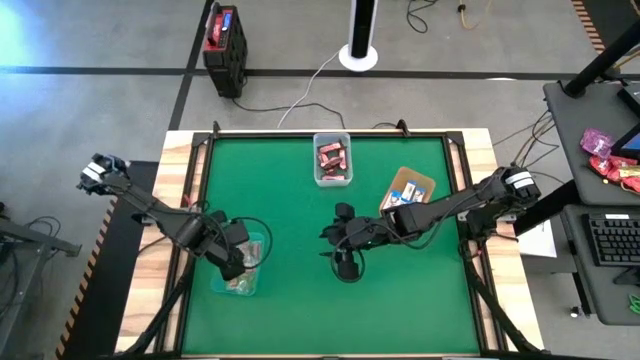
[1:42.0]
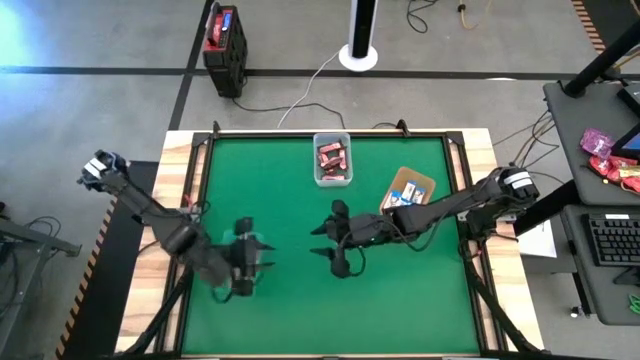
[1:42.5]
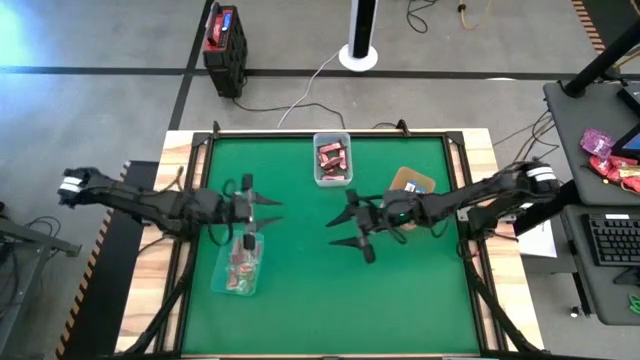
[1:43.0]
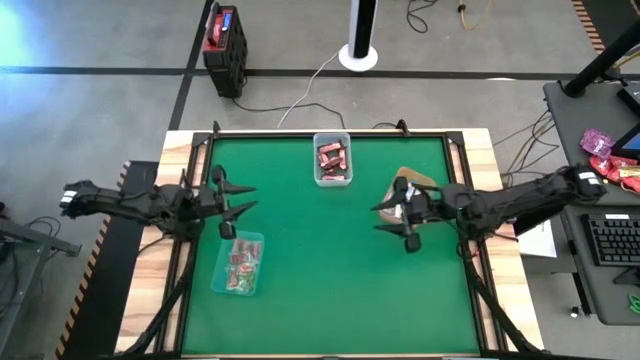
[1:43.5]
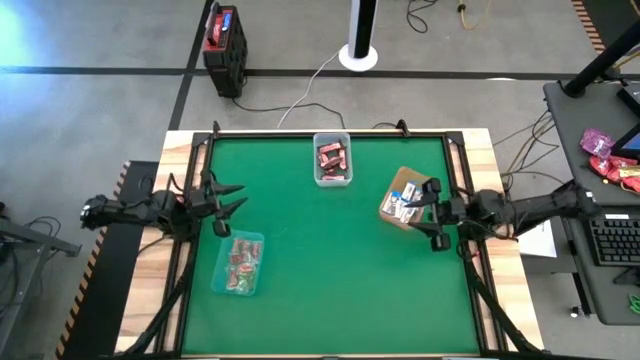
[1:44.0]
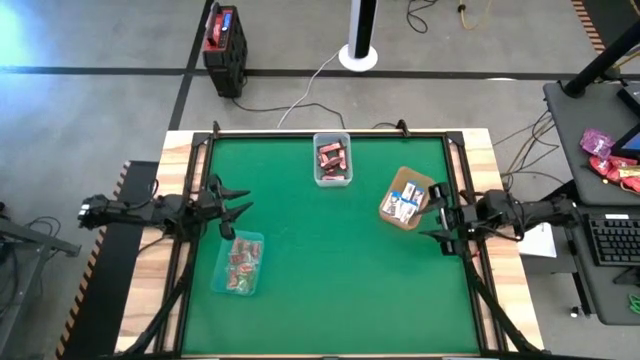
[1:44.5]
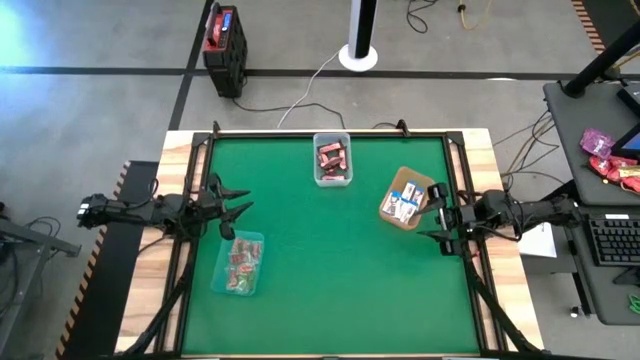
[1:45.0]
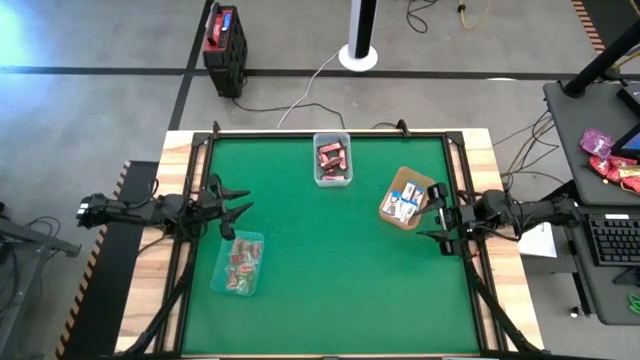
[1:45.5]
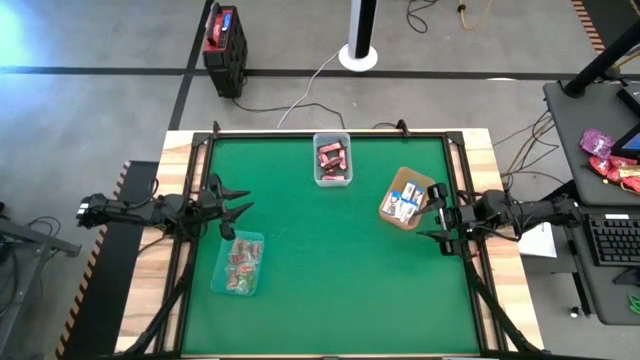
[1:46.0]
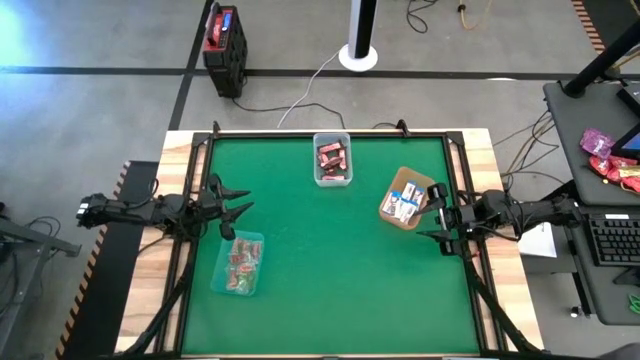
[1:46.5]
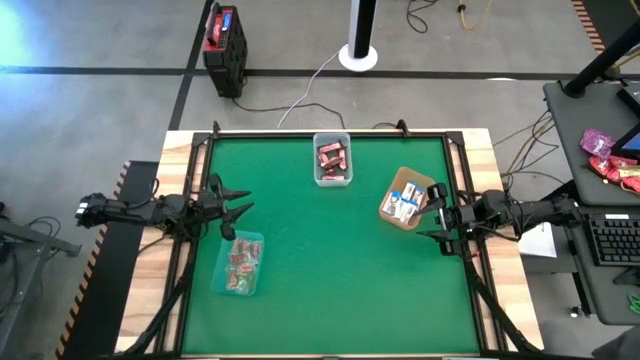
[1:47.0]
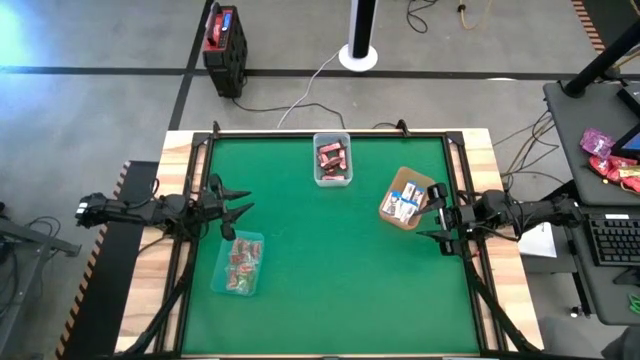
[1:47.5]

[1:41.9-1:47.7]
Task: Sort candy by brand, put in halloween buckets
Return to Home Position

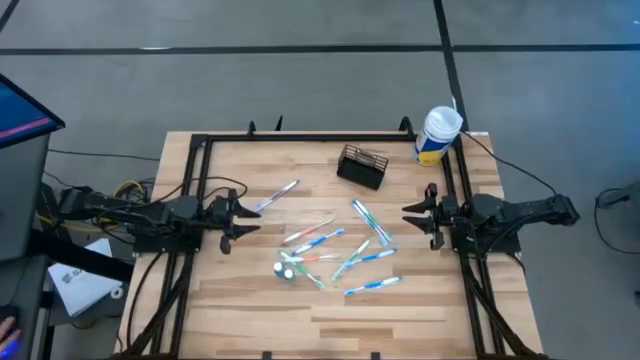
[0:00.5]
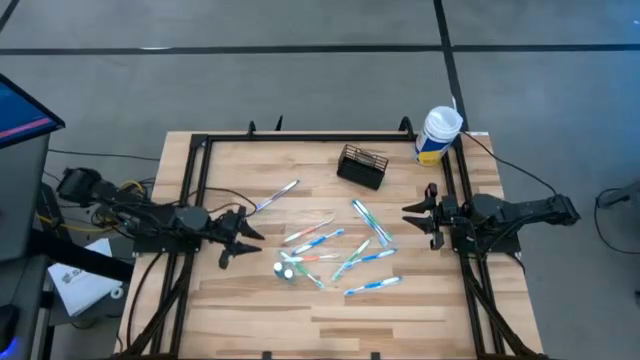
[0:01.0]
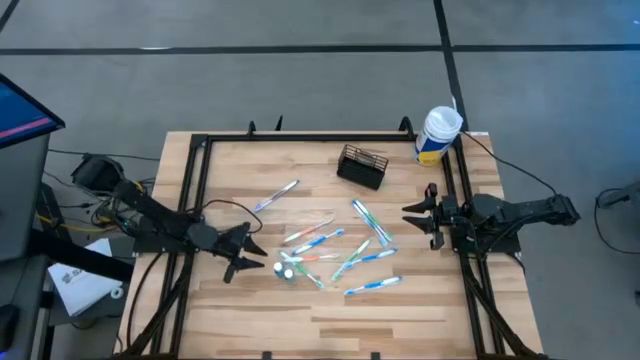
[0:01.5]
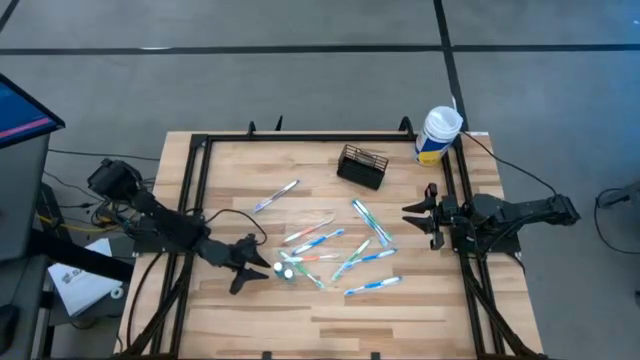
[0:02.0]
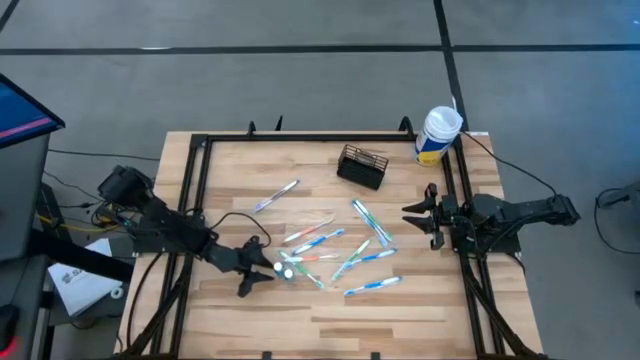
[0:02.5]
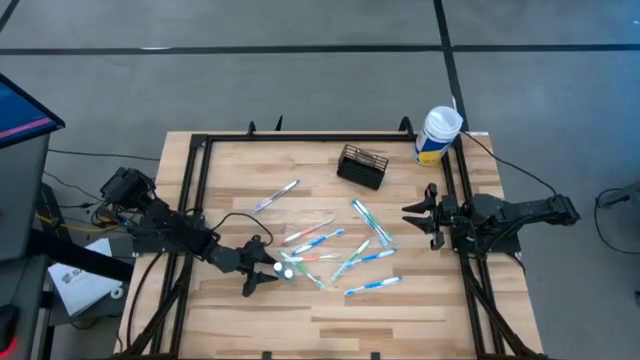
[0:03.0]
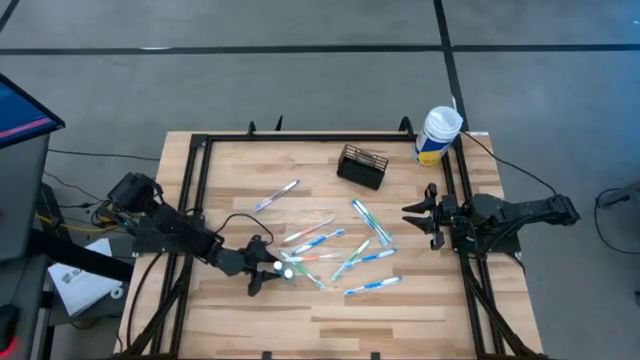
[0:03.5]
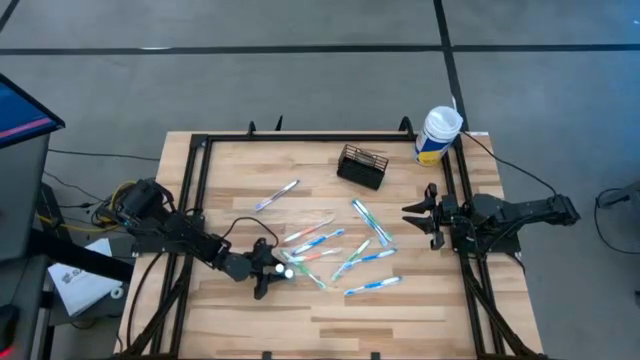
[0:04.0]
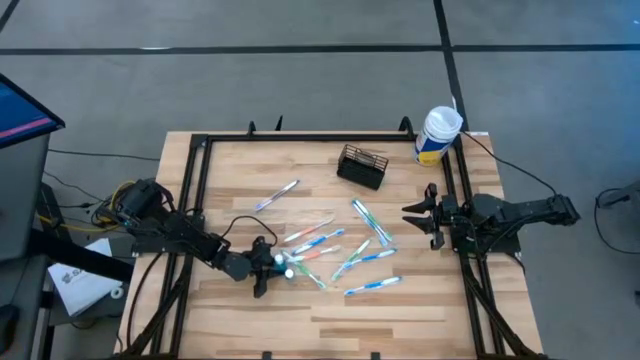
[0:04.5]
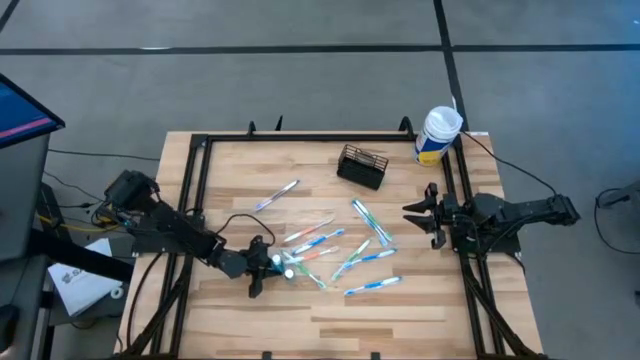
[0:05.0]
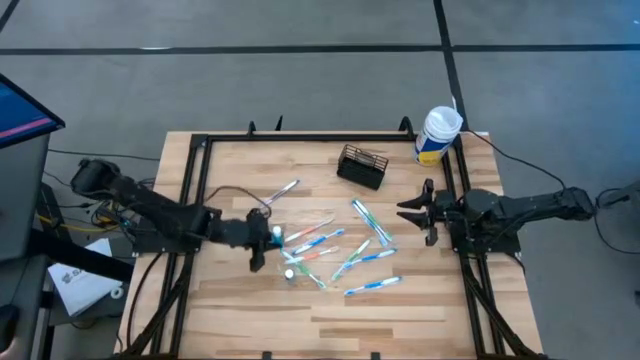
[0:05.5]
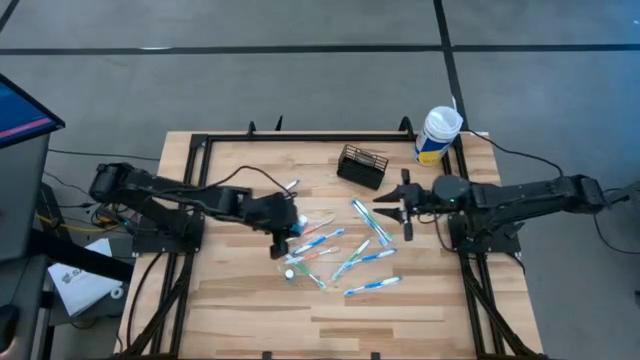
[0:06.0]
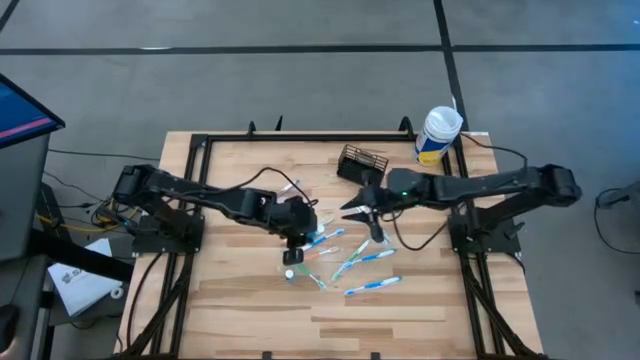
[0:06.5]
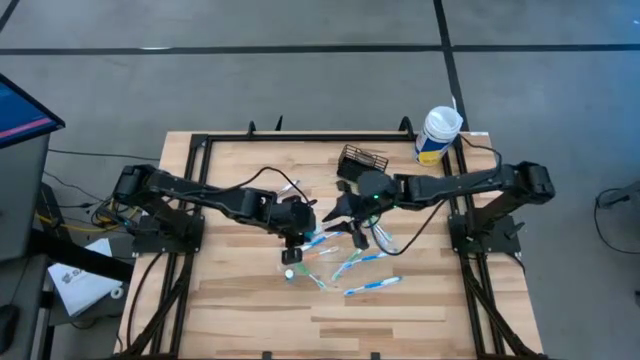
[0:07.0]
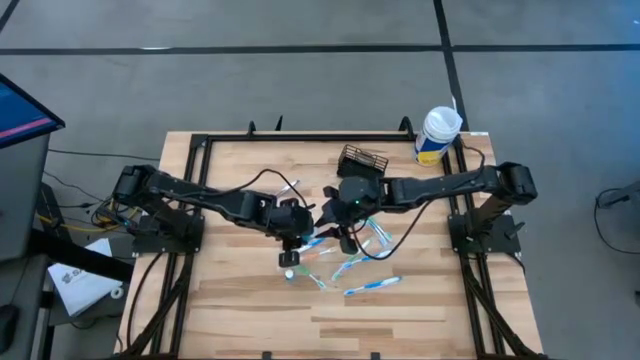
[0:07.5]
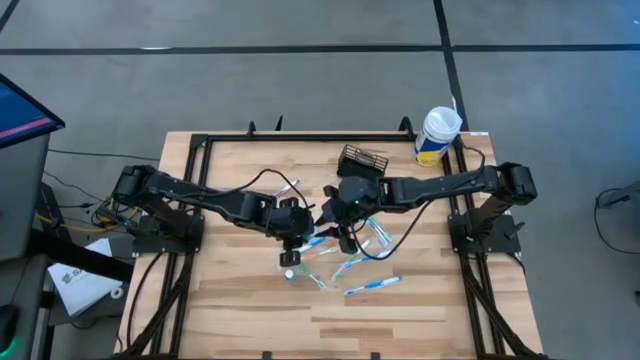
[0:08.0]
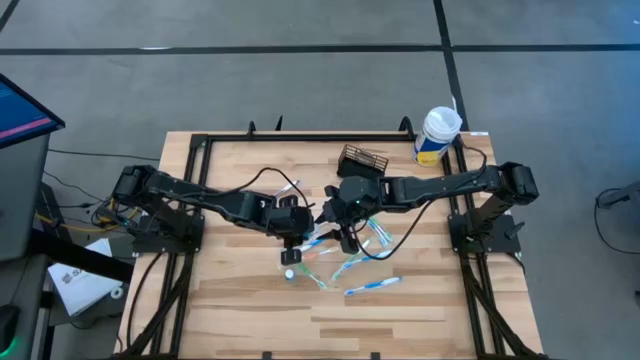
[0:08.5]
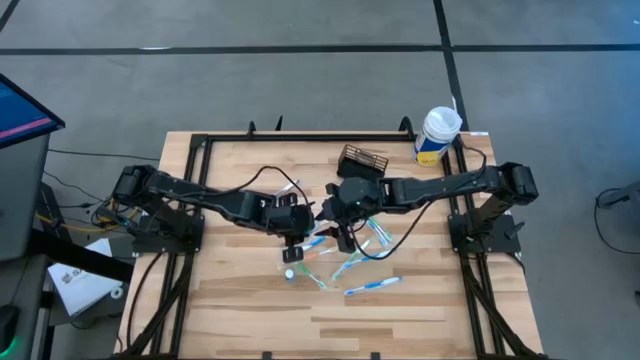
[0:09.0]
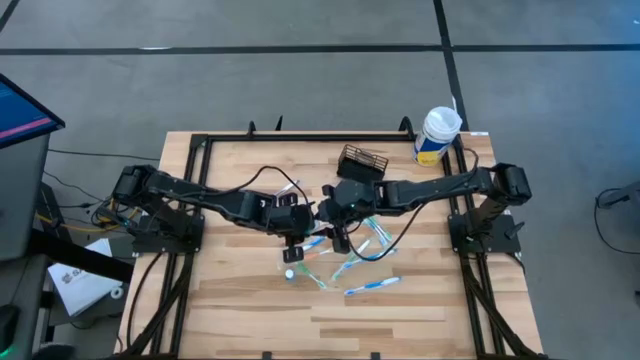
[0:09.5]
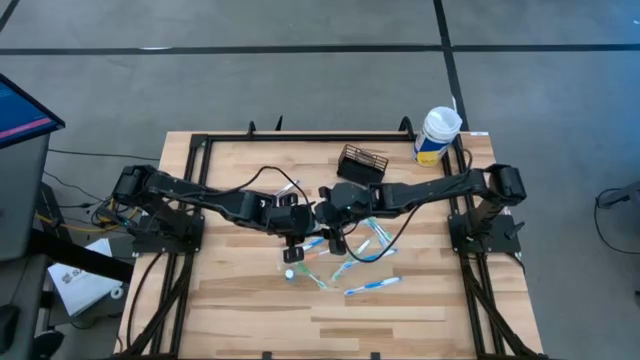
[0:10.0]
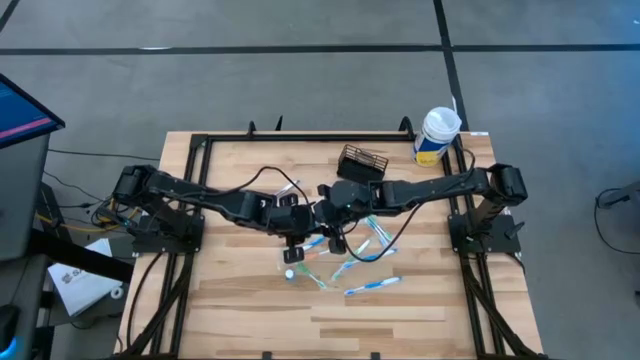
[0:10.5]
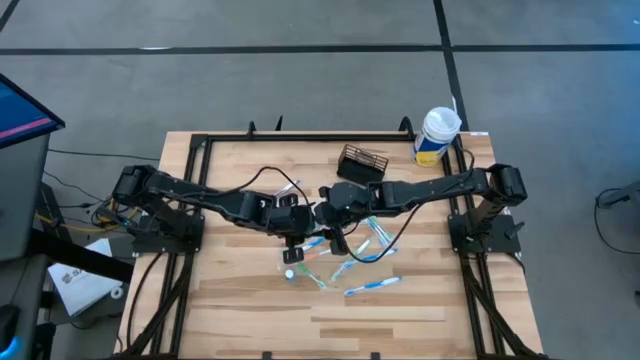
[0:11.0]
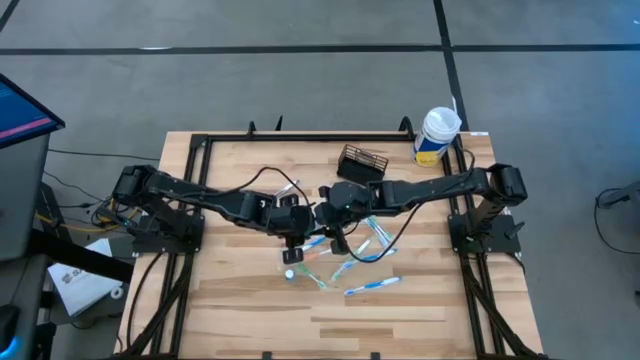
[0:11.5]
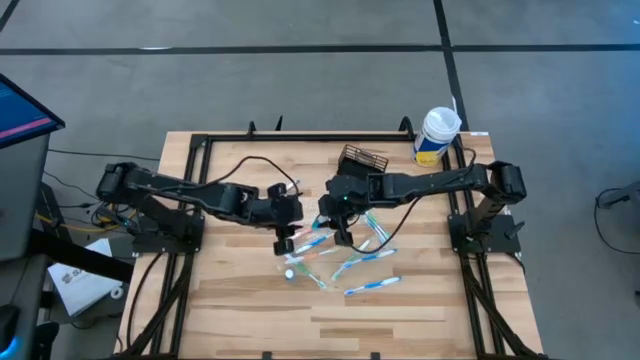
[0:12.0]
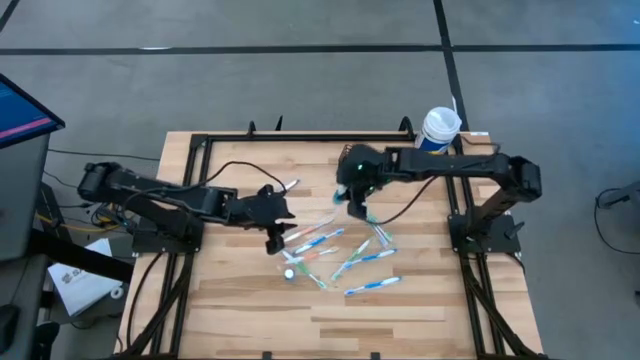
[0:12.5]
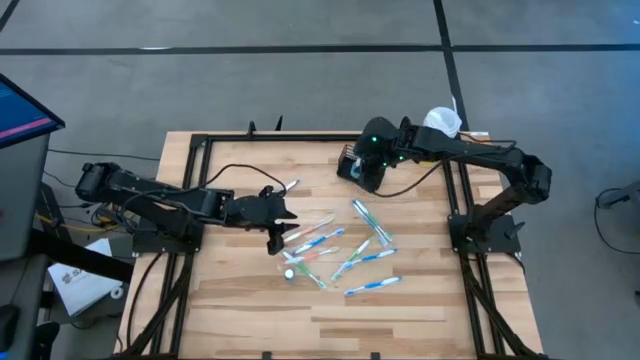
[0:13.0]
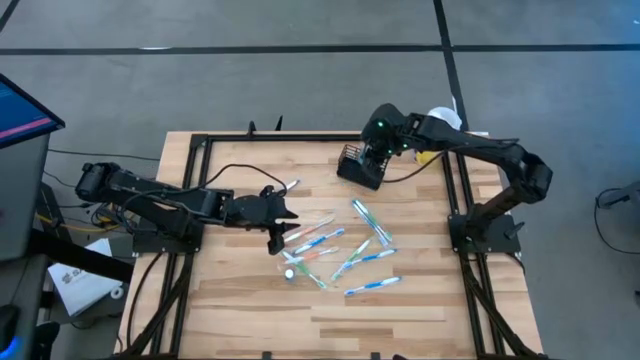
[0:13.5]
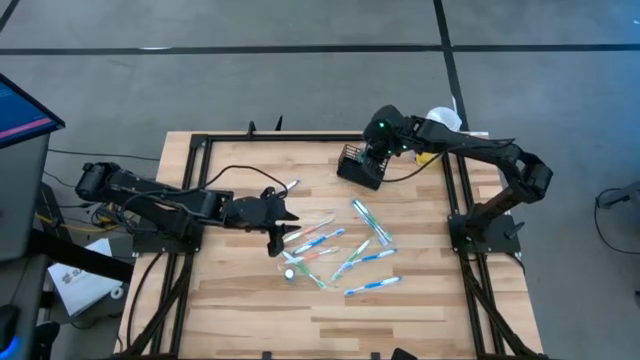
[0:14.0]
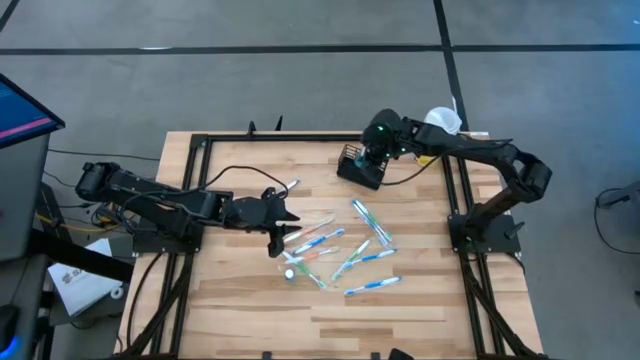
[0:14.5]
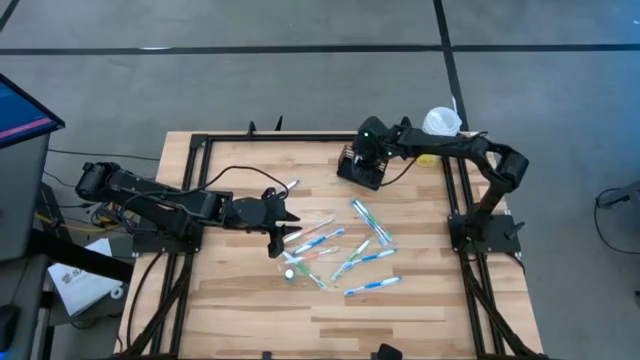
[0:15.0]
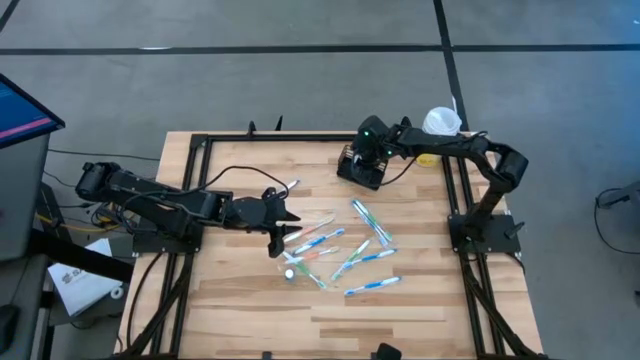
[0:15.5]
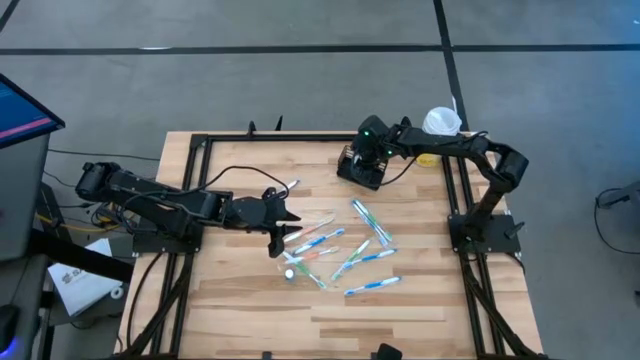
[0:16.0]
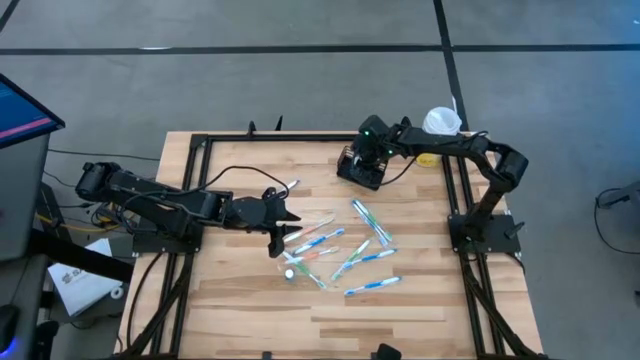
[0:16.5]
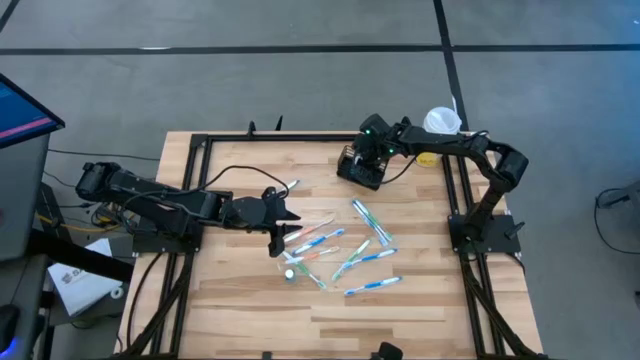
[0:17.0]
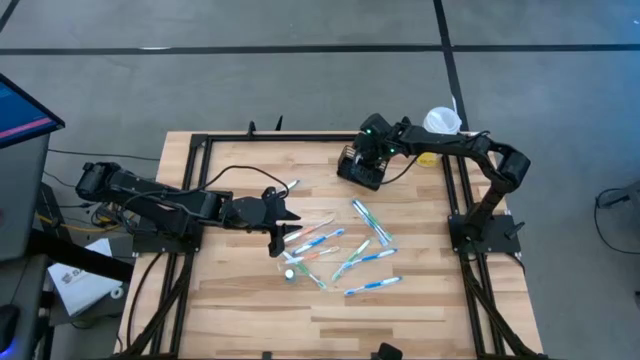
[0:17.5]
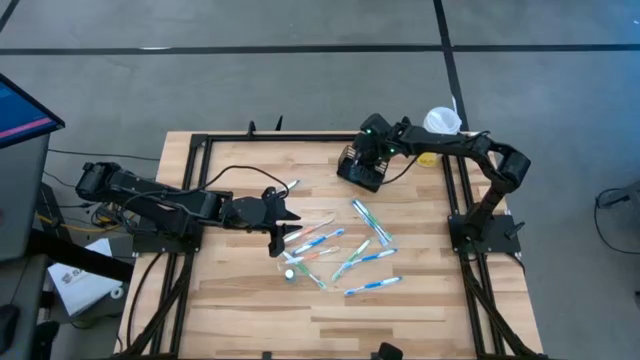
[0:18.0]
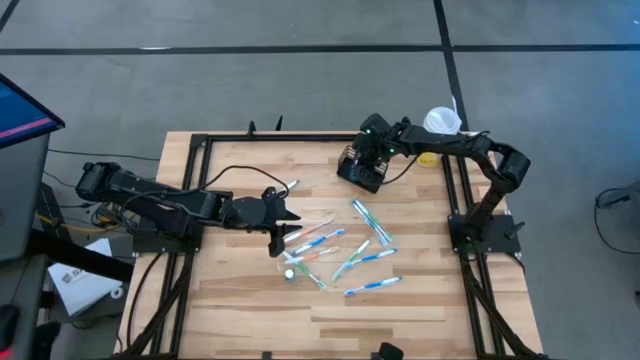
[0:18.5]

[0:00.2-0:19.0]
Task: Pick & Place toothbrushing station
Put the left mouthwash bottle into the mesh organizer
